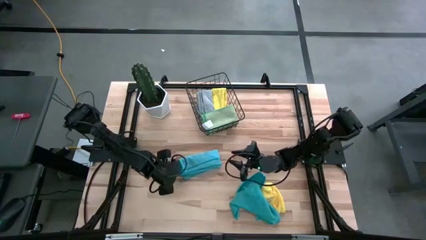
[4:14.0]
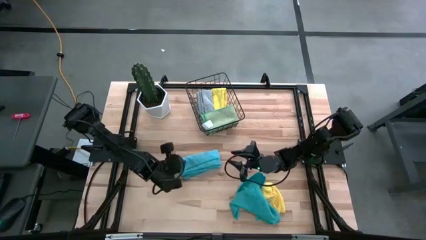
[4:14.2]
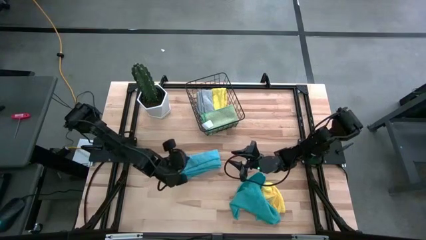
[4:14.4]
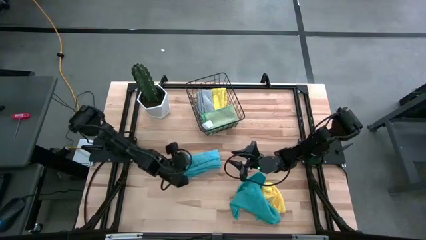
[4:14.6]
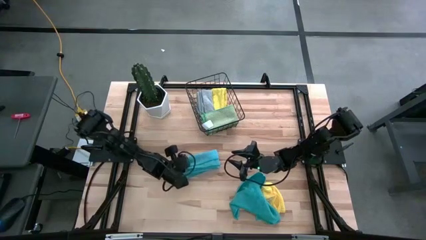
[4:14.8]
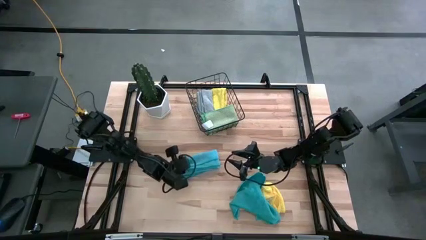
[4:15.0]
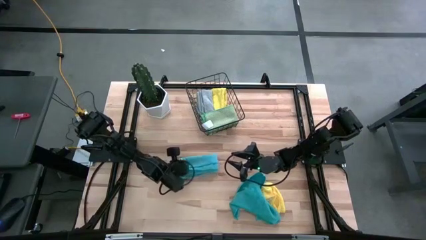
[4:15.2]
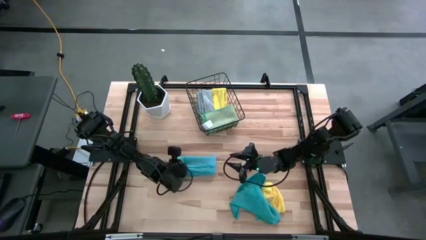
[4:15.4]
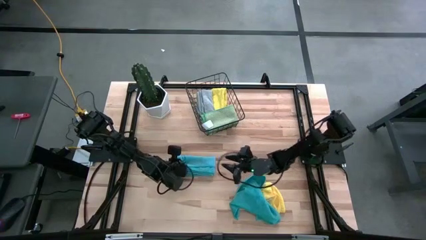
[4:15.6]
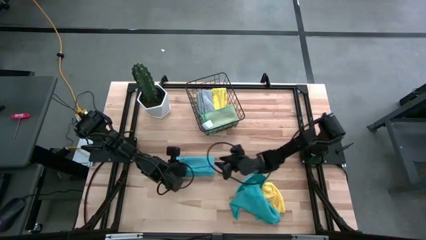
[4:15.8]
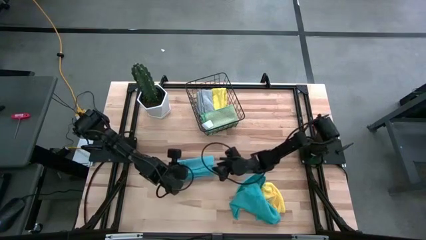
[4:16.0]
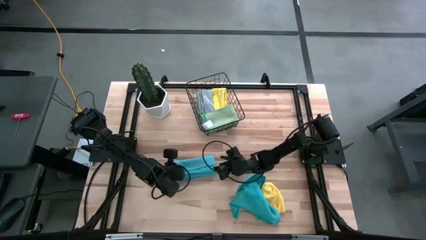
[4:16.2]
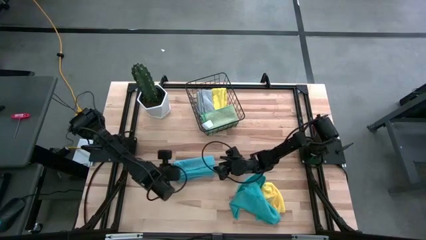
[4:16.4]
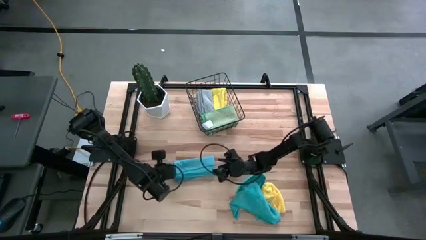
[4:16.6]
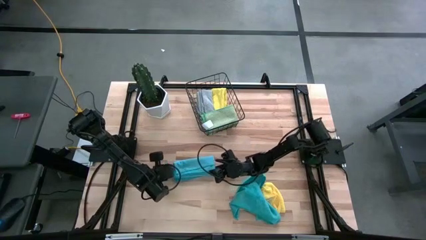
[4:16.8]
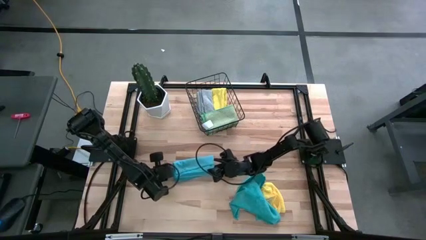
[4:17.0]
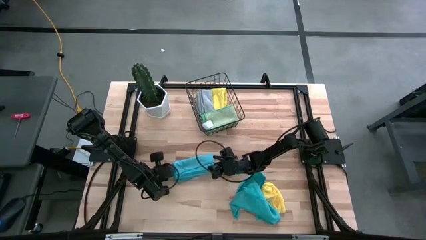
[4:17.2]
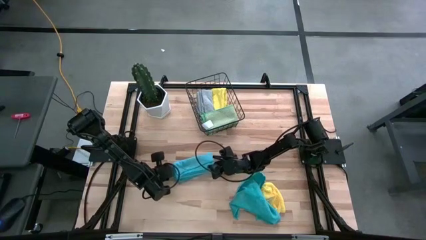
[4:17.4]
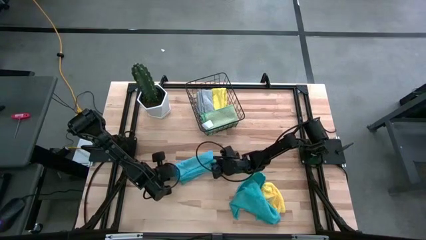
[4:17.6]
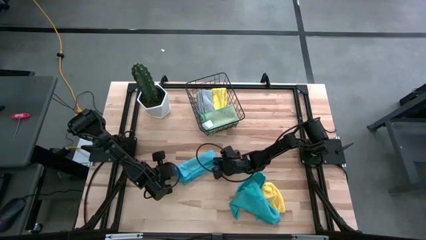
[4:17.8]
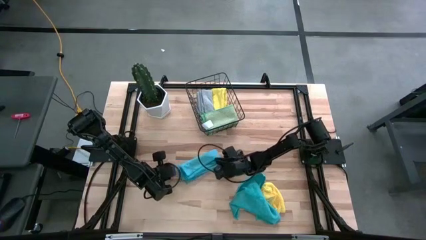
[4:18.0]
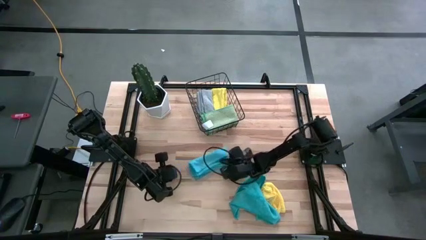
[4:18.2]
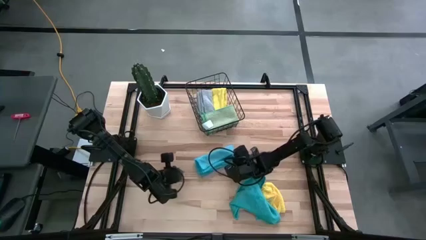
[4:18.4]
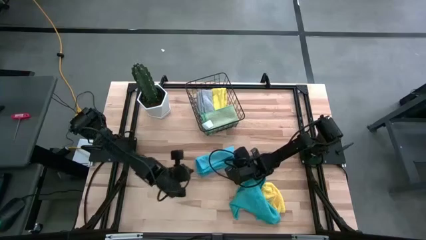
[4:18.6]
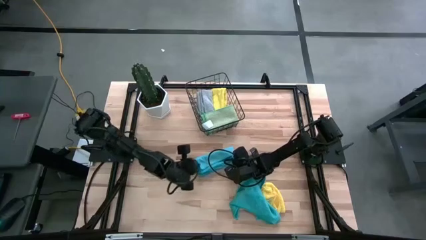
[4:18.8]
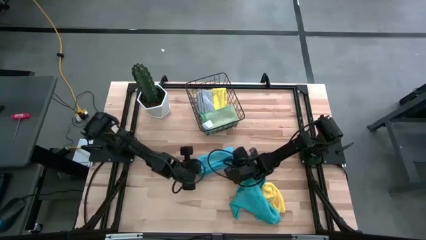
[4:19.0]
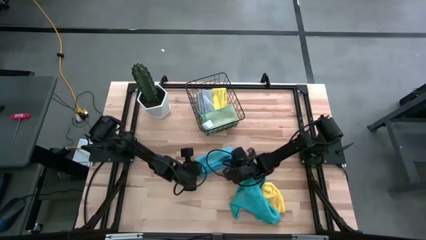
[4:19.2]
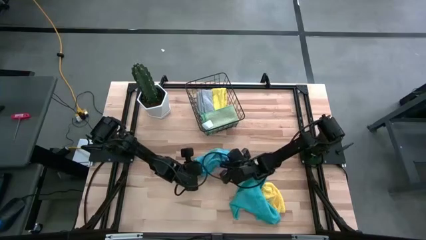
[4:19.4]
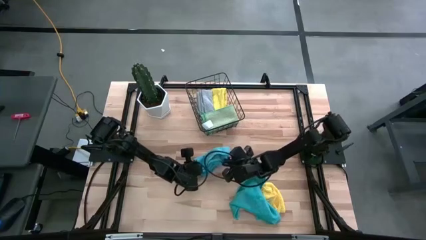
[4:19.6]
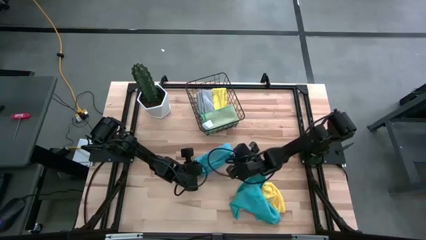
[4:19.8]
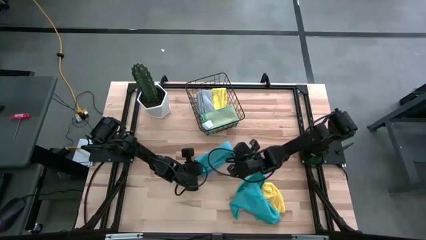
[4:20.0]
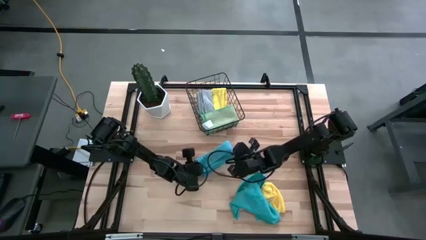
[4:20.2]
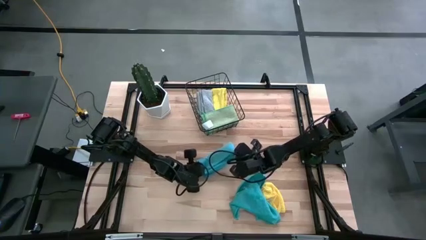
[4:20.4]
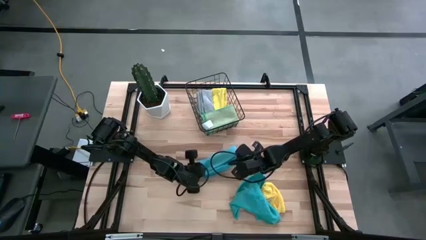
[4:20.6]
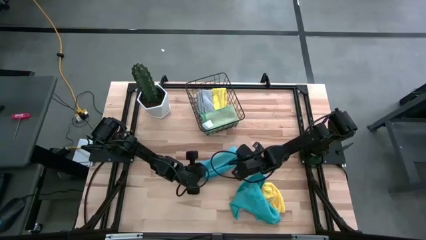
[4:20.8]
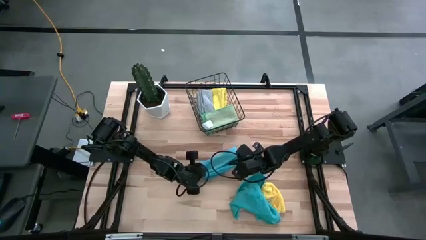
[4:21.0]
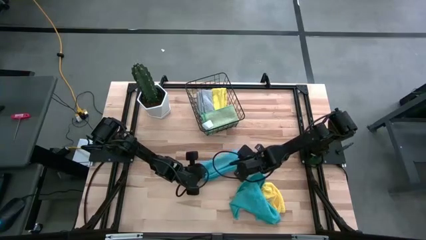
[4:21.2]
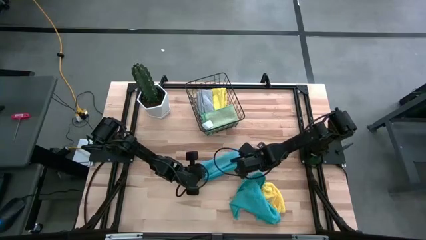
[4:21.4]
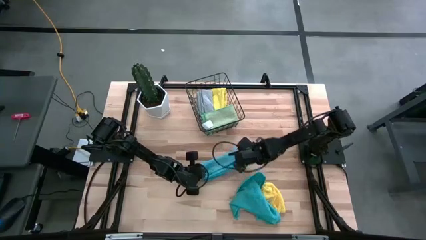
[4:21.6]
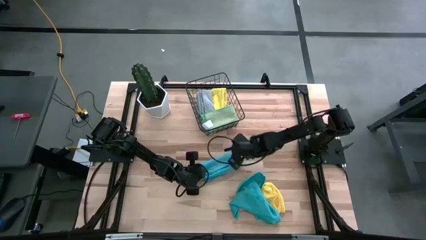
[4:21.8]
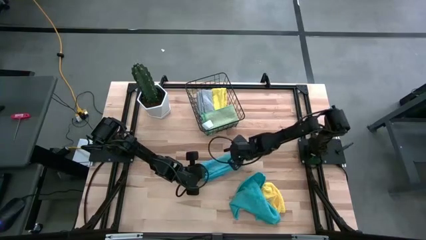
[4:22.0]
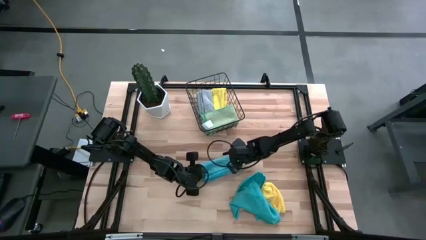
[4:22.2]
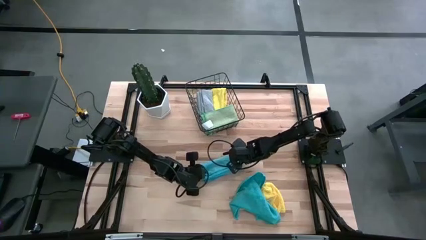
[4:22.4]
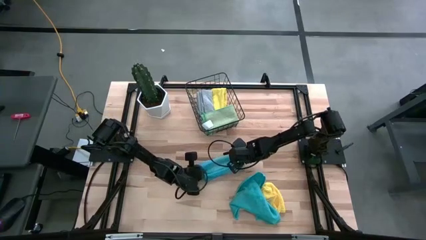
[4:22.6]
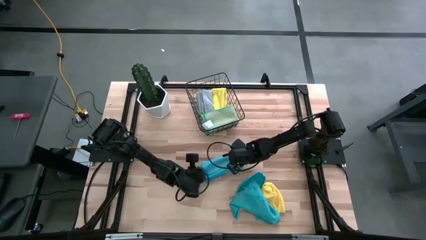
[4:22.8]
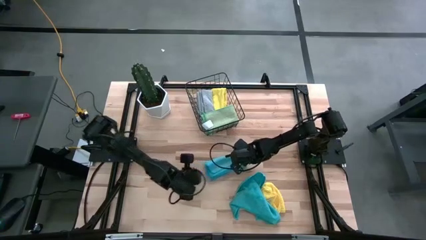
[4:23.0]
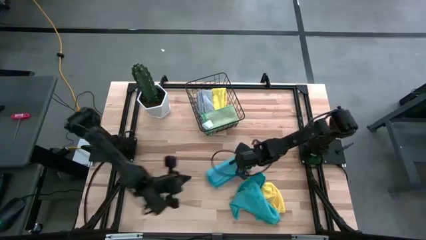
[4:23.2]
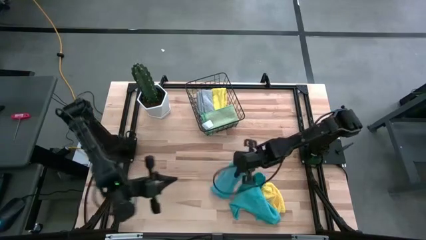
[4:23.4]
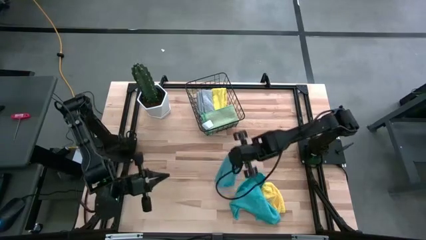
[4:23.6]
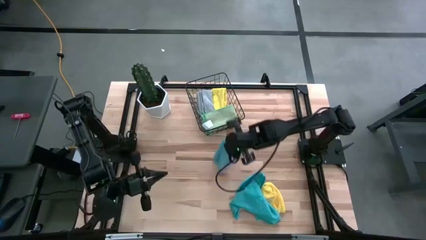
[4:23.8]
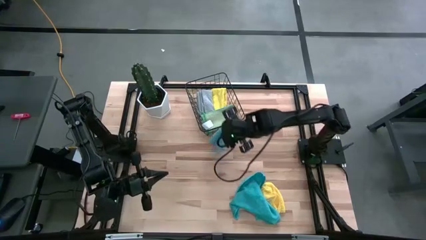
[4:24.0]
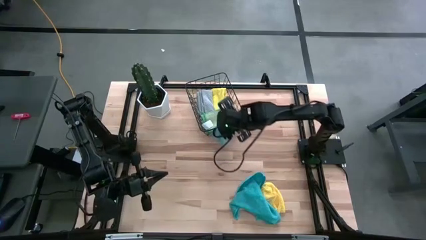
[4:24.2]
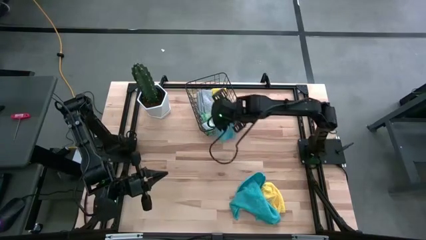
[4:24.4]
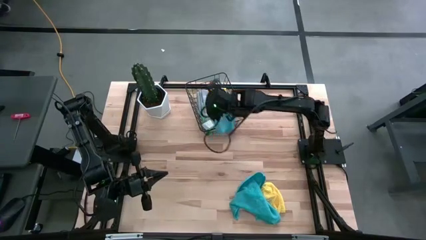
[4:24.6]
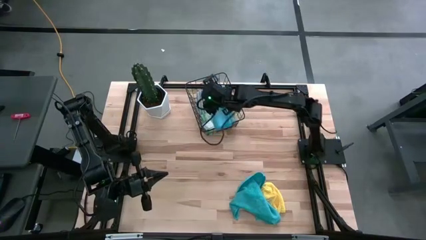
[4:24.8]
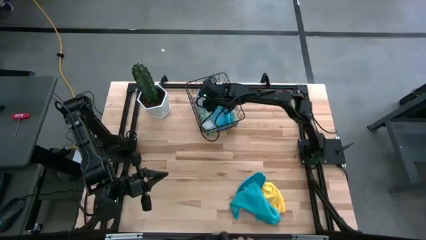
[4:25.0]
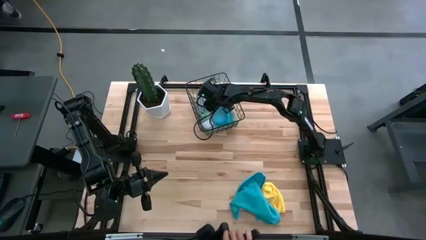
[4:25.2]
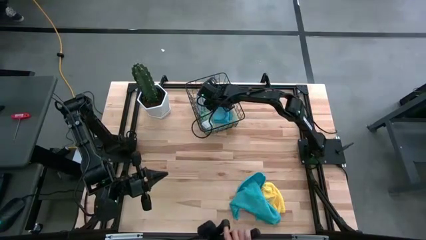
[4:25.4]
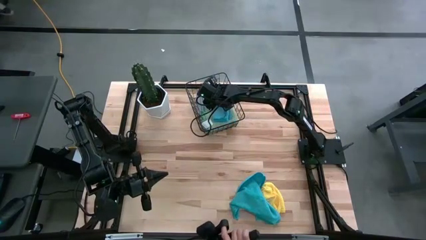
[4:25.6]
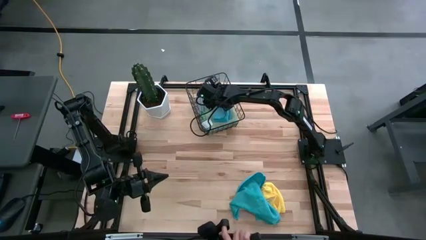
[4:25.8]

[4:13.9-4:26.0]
Task: Fold microfiber towels
Put the left blue microfiber cloth into the black wire basket

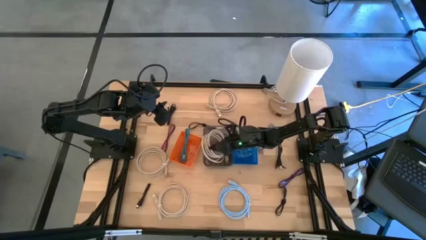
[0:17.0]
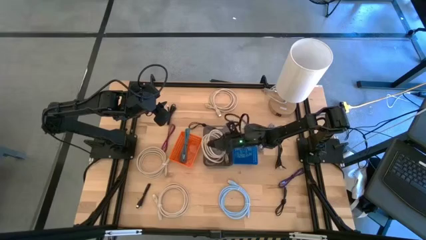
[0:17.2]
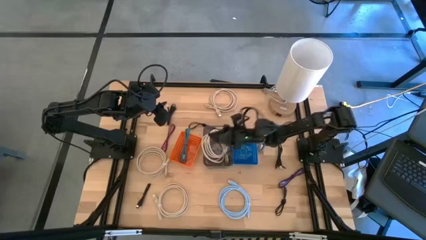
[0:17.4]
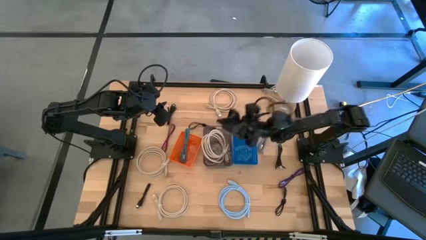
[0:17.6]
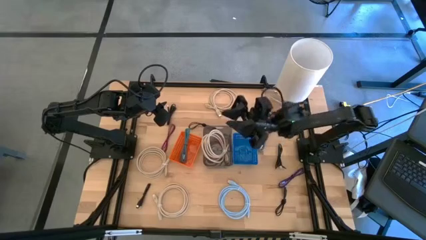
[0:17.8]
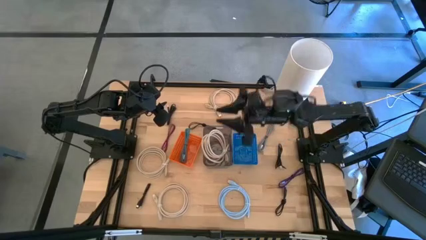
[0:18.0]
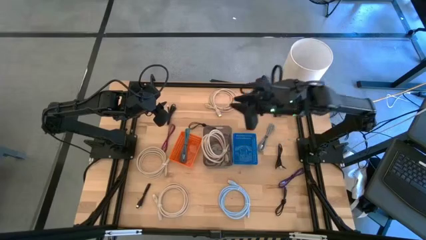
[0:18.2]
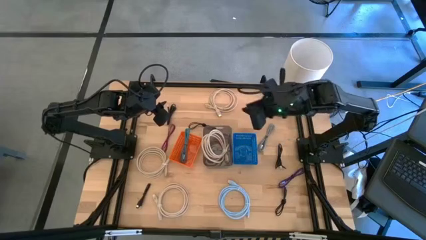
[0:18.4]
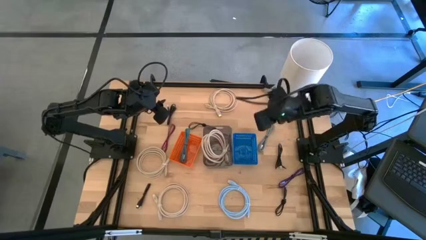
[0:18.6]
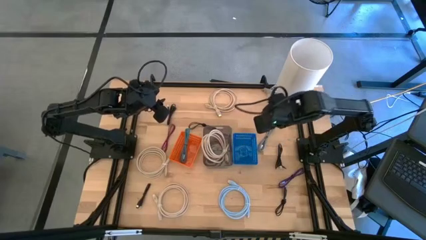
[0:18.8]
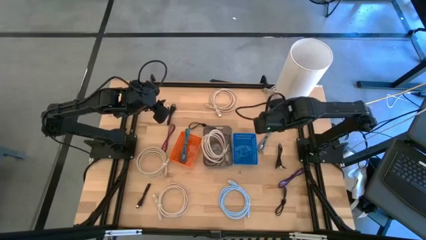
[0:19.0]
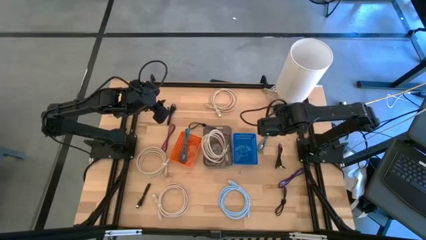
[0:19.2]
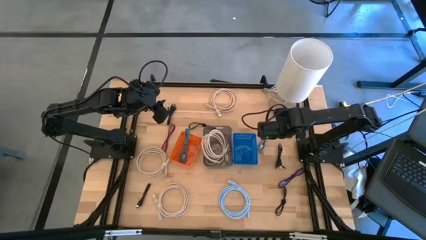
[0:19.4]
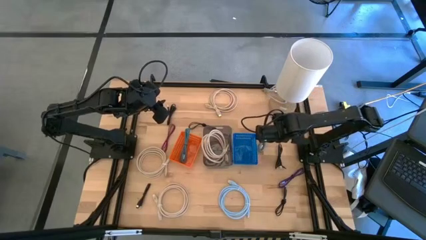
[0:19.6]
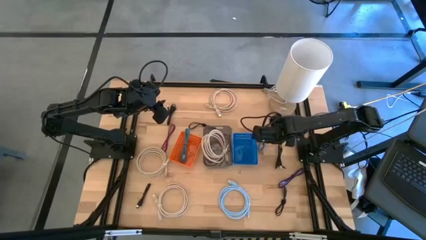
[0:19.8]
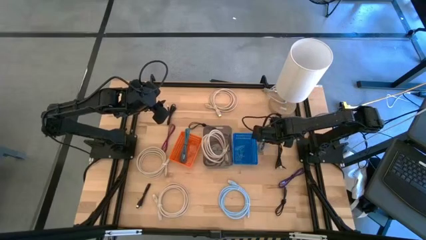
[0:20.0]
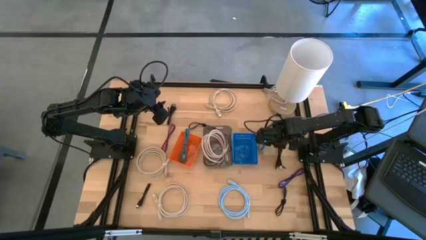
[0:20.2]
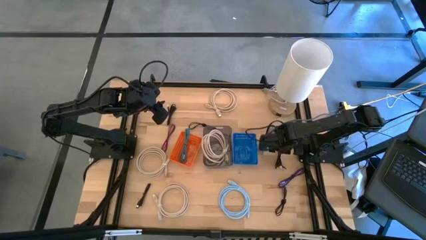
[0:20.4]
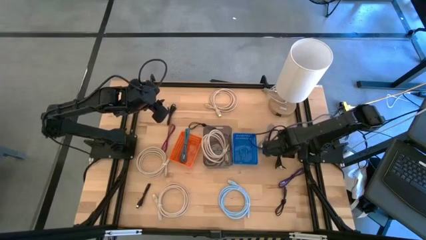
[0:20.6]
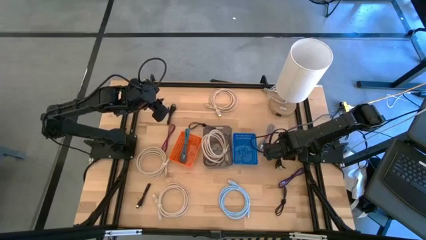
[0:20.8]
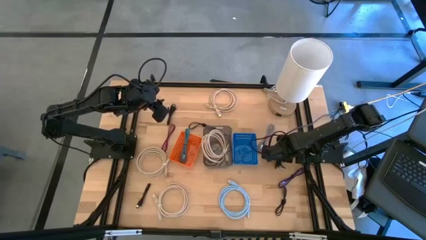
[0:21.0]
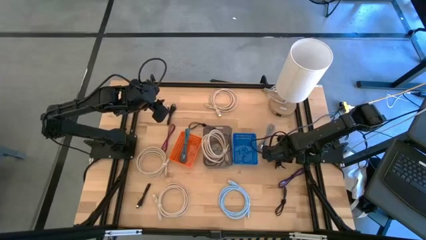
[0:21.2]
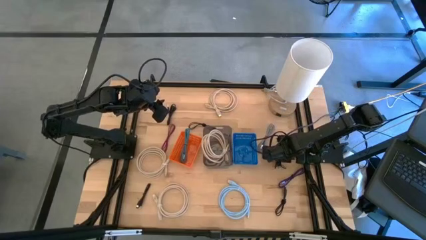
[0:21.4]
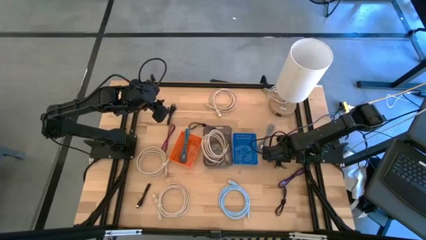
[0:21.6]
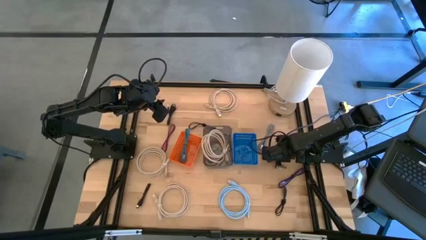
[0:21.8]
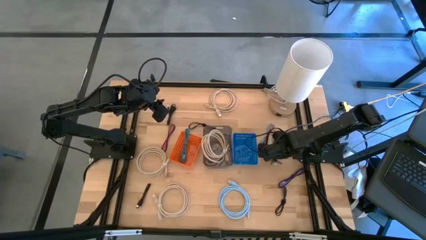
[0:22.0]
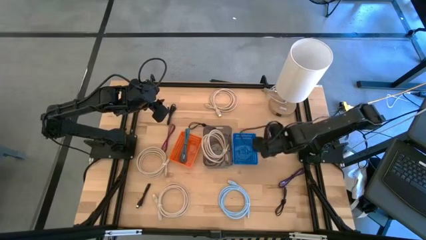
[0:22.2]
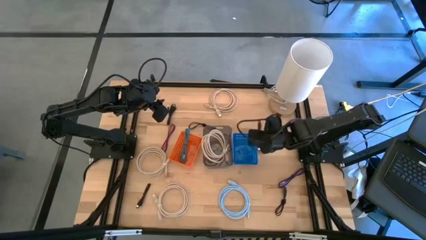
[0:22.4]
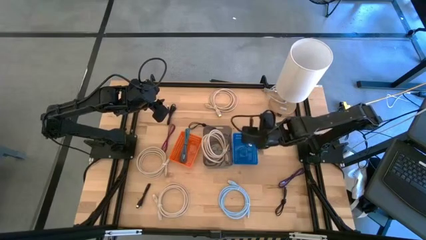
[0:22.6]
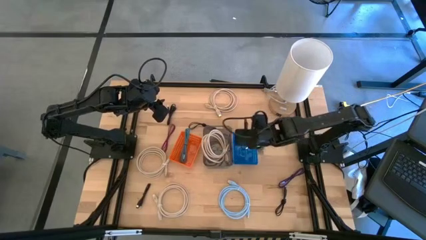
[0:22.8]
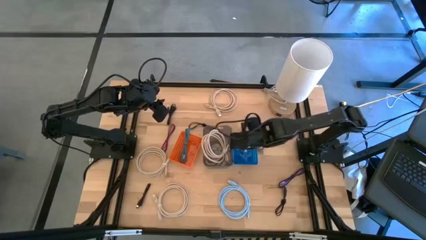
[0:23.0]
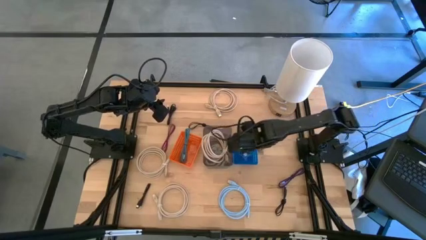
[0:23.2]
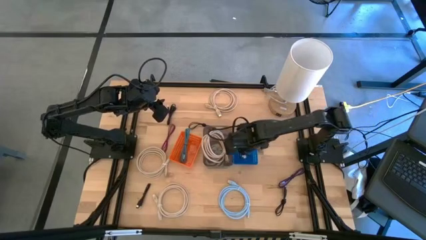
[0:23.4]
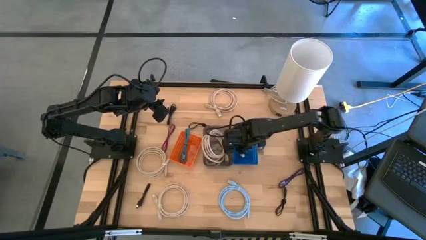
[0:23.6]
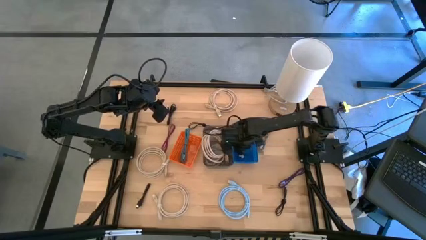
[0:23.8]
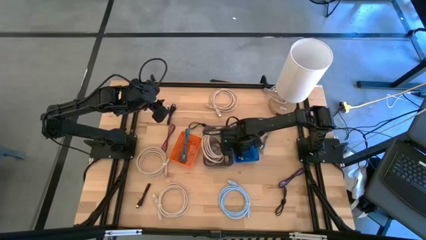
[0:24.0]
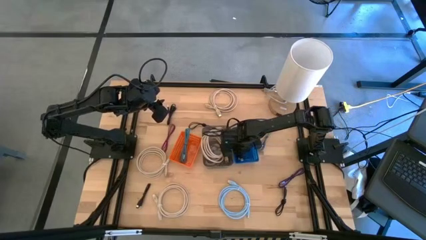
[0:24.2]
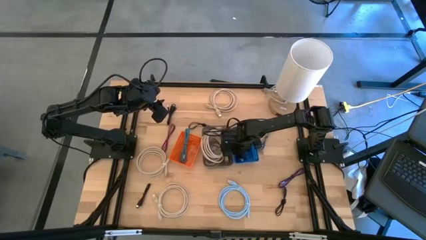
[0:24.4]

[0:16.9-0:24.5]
Task: Pick & Place USB Port
Put the black charger cable into the blue bin
